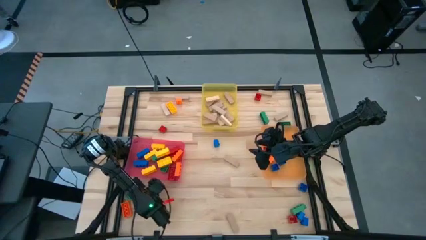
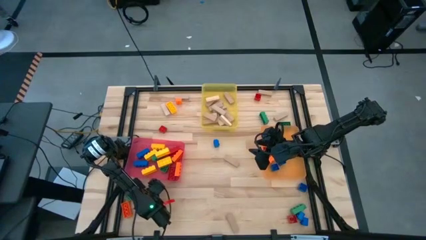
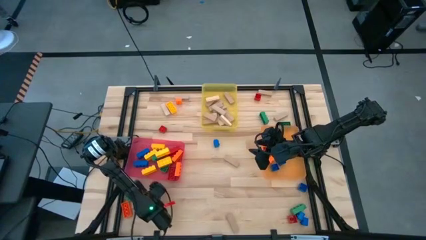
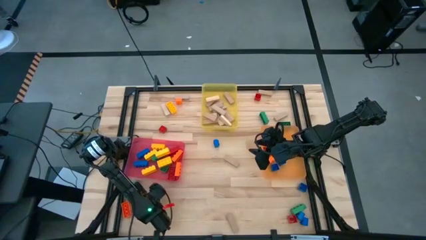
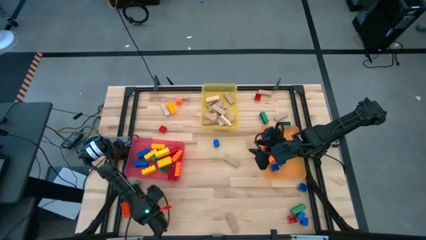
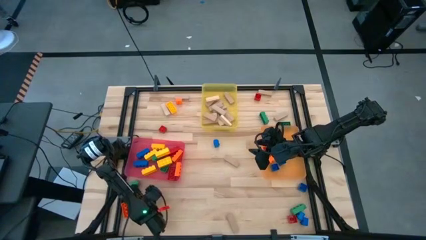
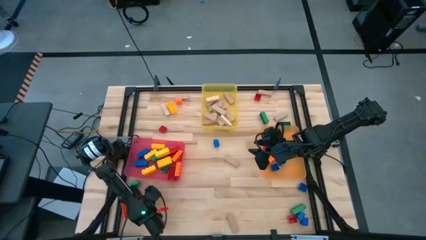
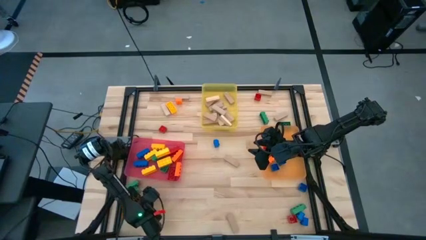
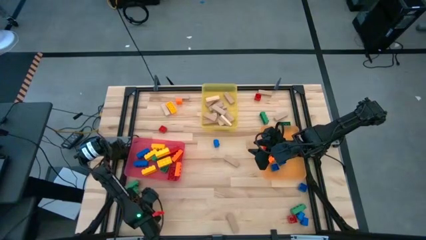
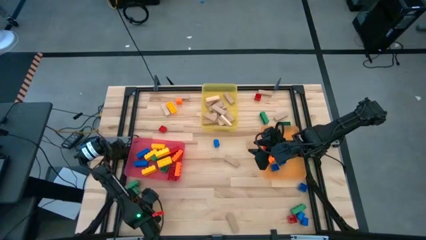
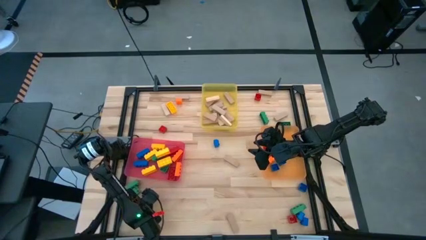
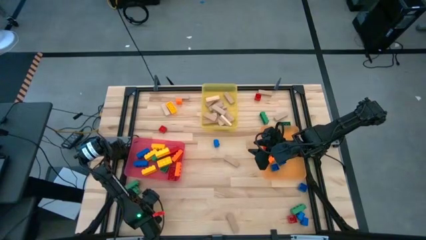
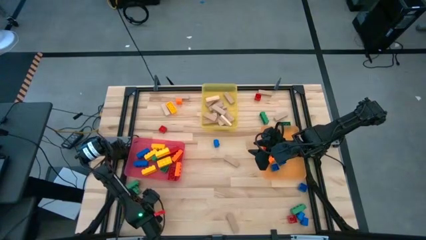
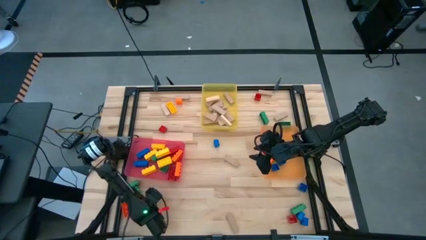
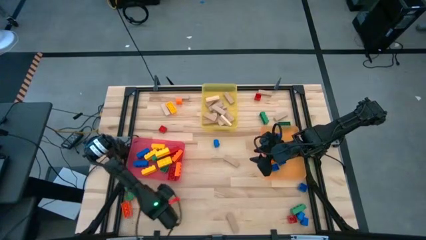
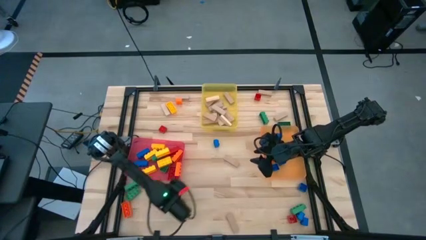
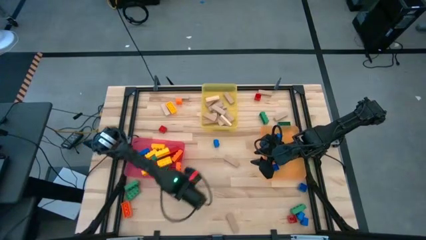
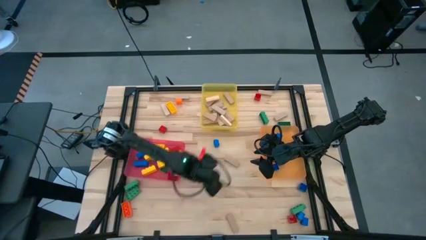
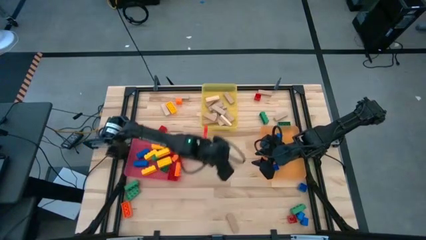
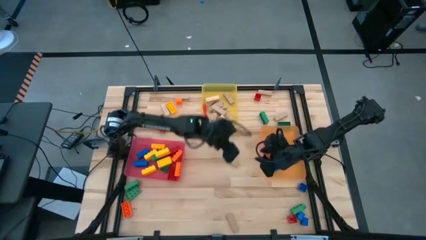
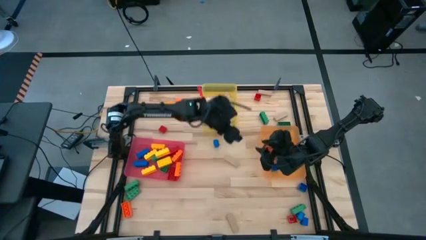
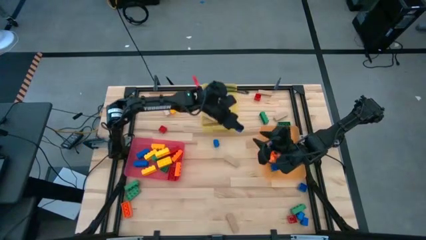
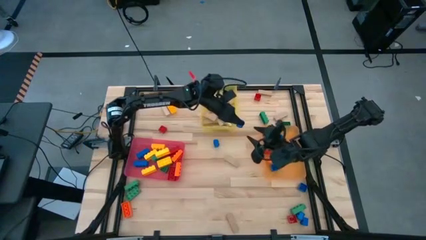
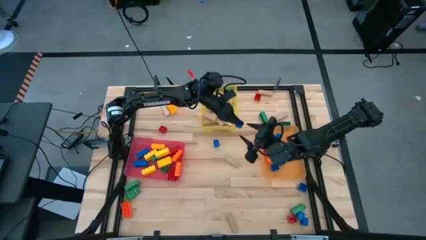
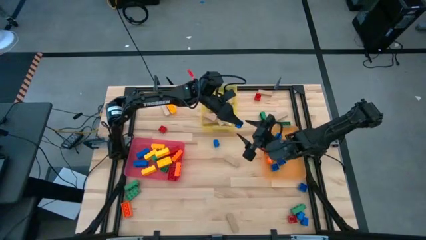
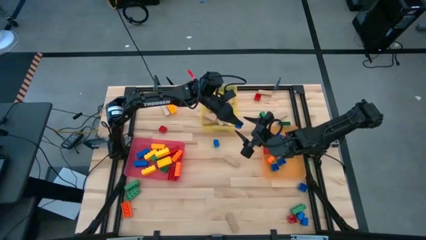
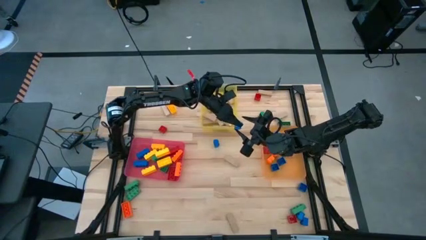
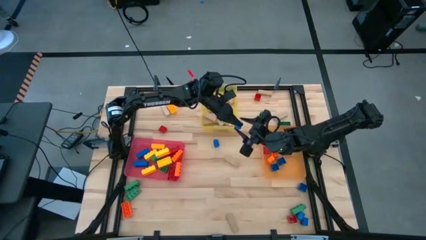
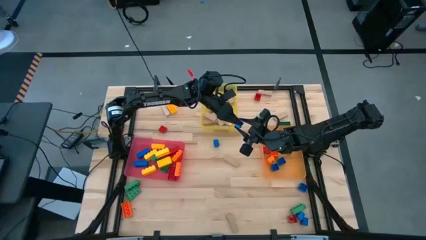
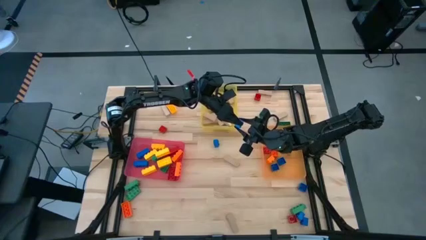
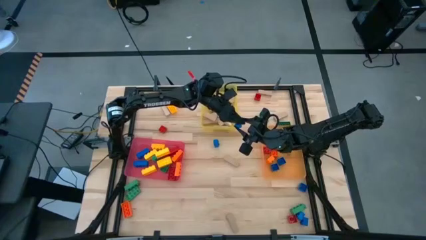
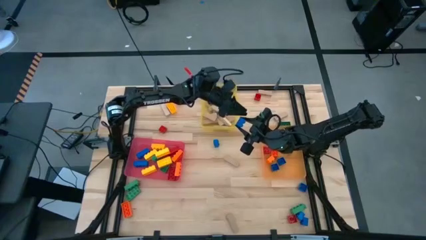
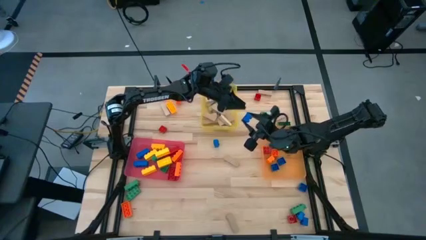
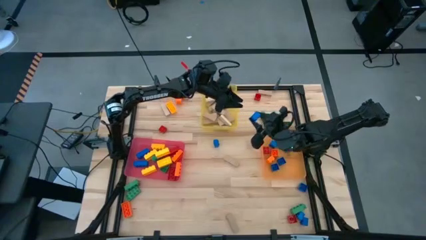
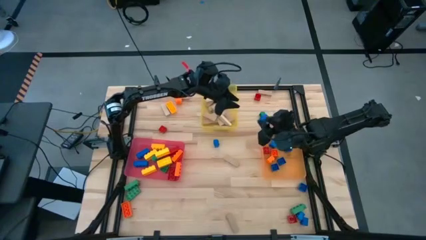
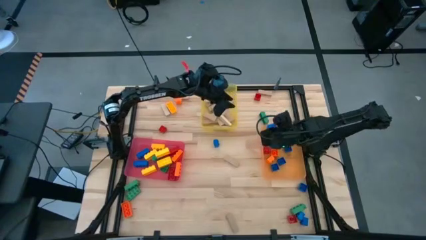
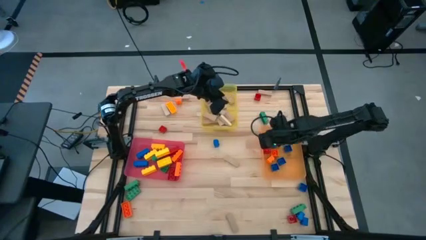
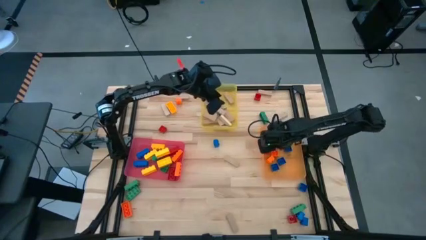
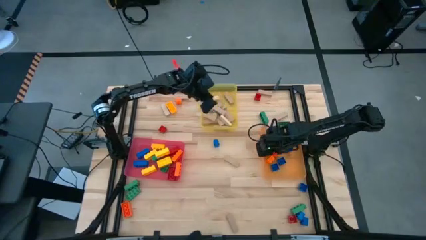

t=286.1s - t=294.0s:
Task: Sort blocks by size
Put the 1 stud blue game piece into the orange bin

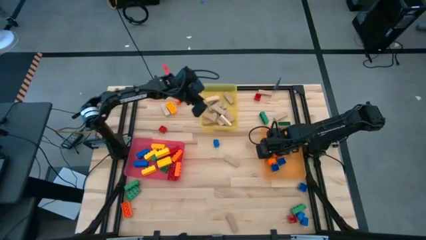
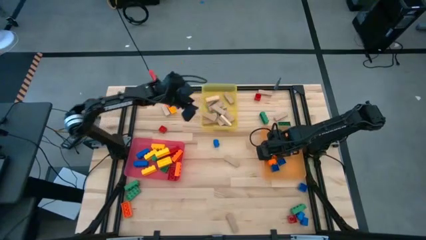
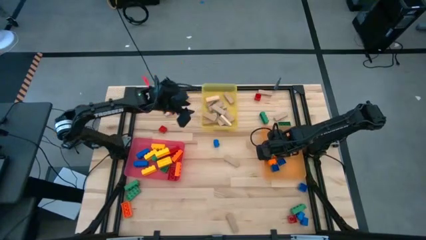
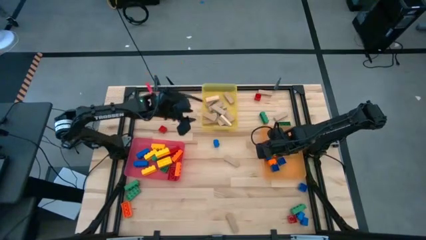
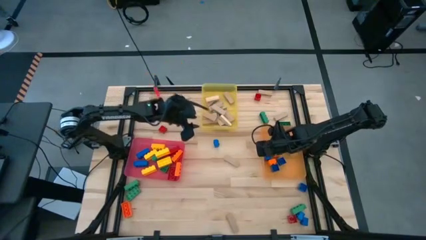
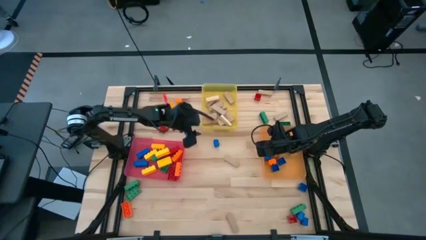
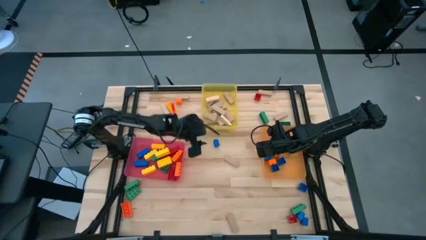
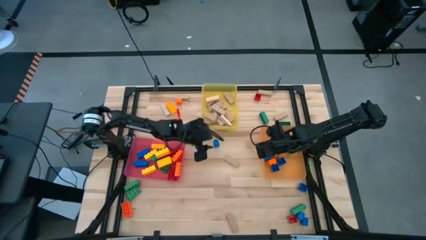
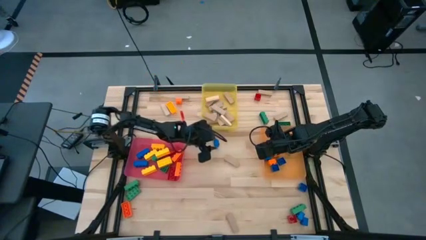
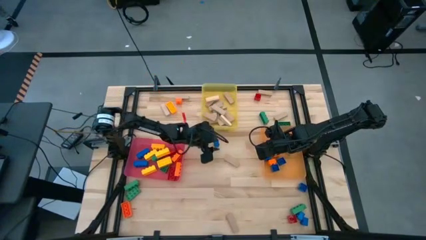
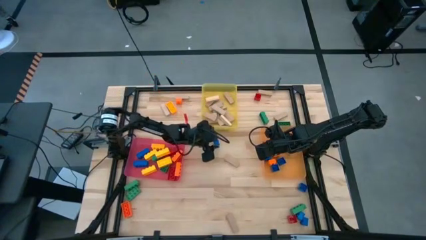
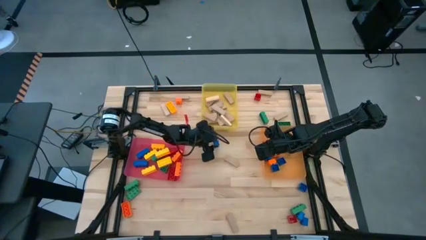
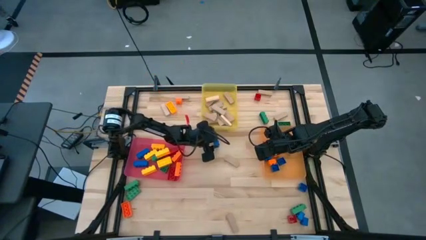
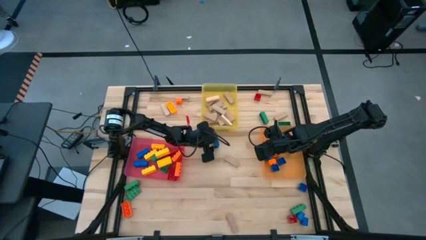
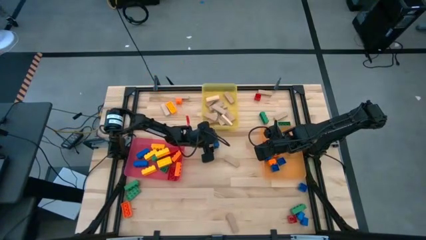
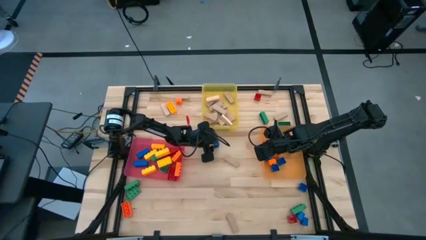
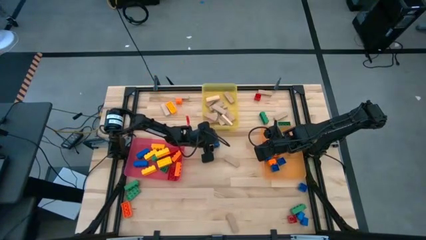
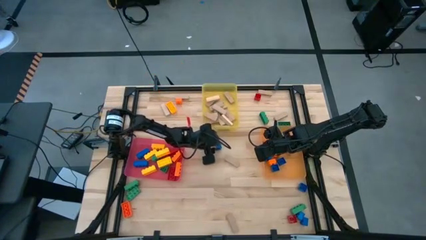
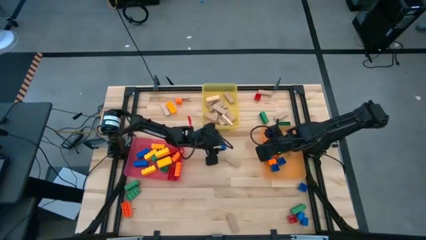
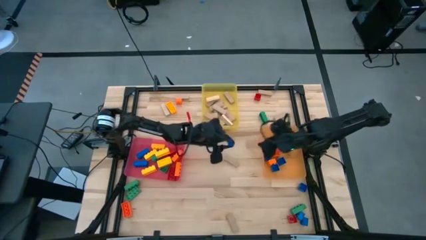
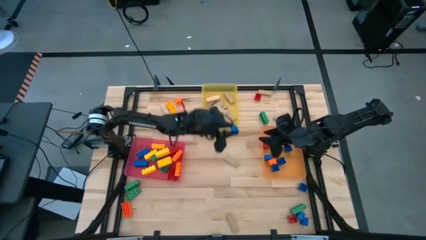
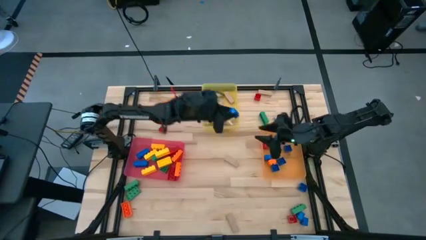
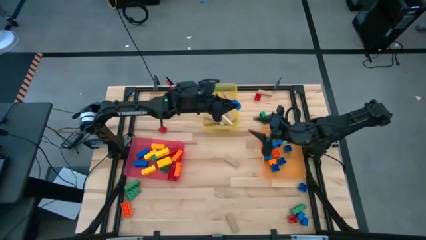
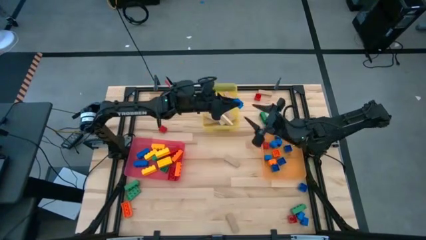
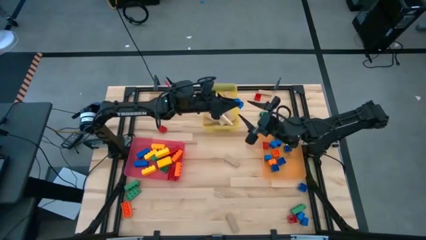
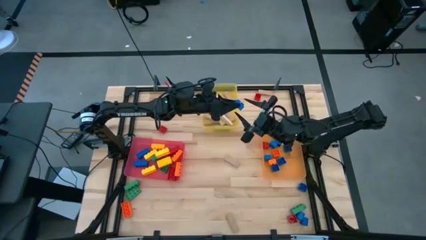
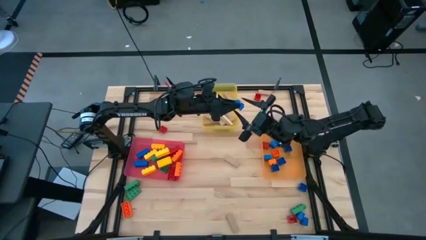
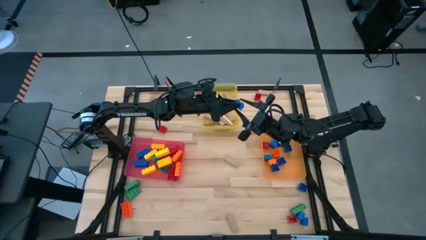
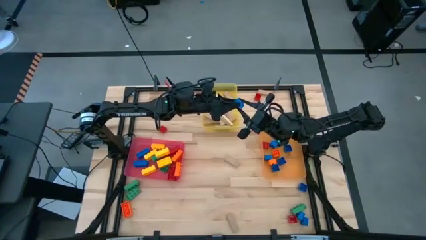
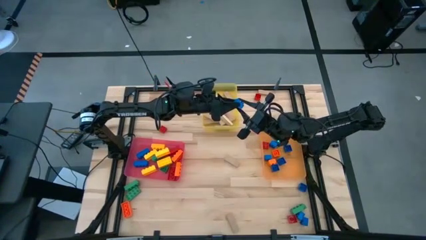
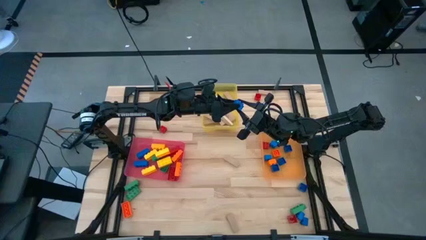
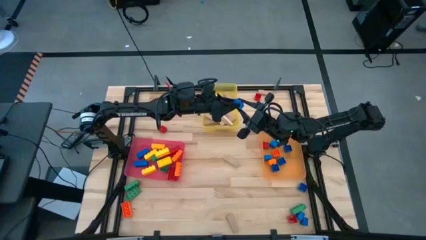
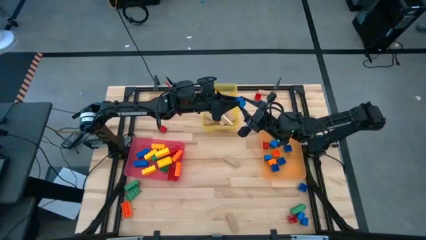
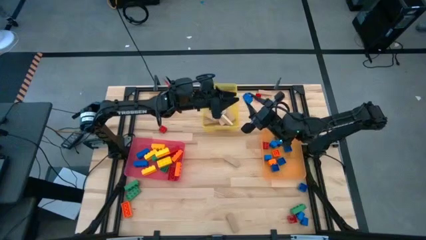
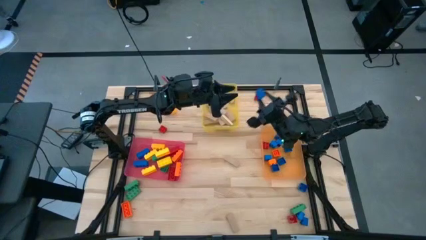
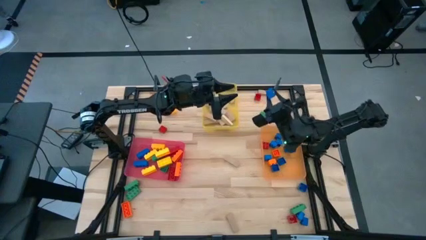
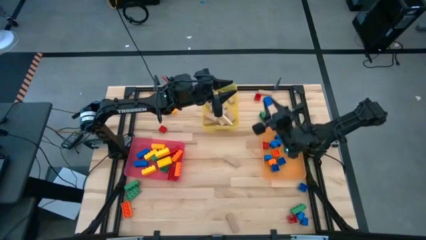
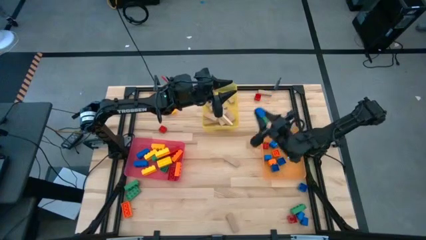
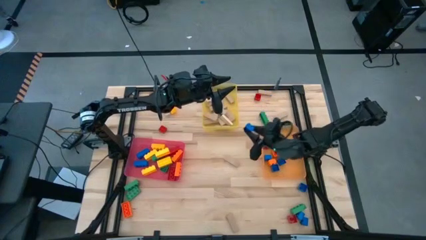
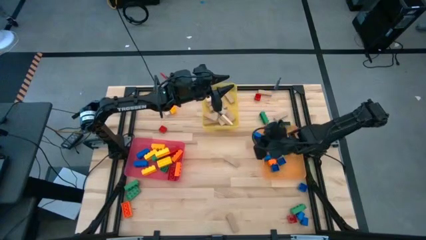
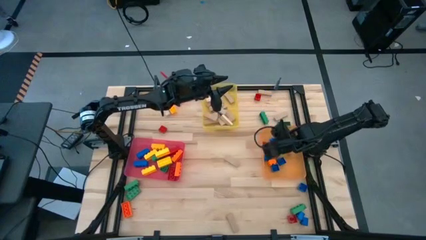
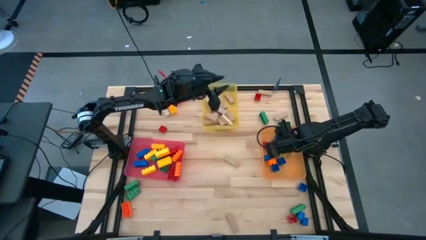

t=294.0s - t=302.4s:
Put the 1 stud blue game piece into the orange bin
